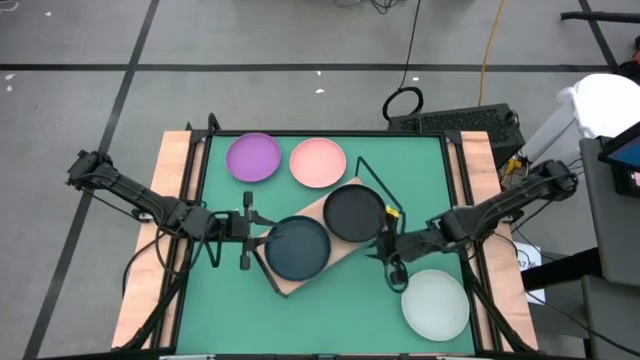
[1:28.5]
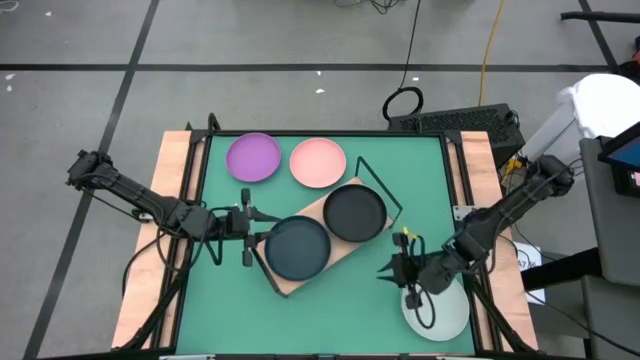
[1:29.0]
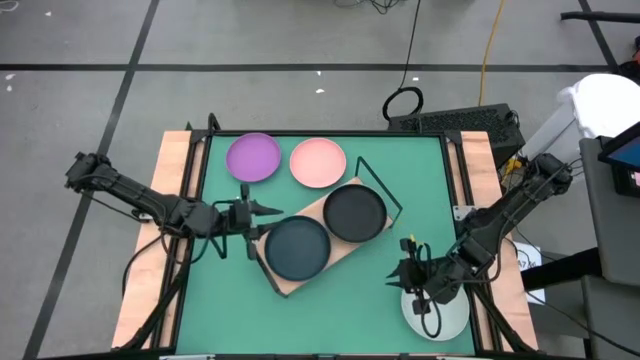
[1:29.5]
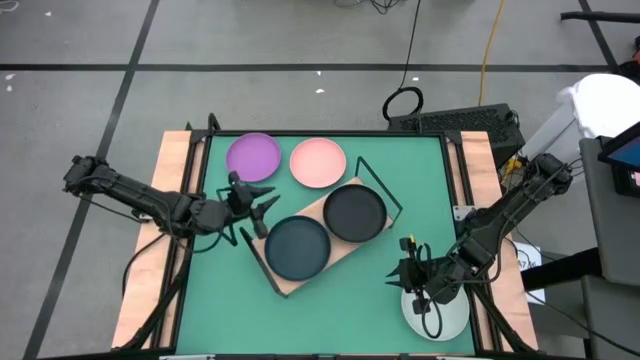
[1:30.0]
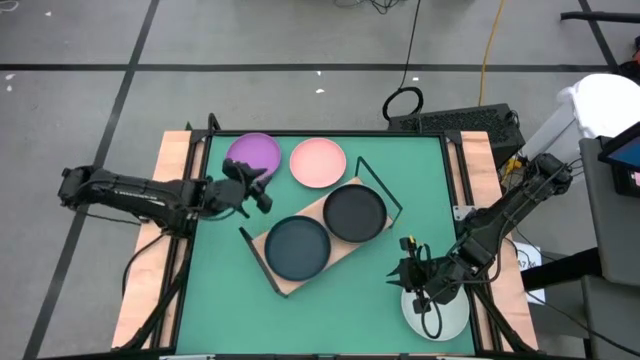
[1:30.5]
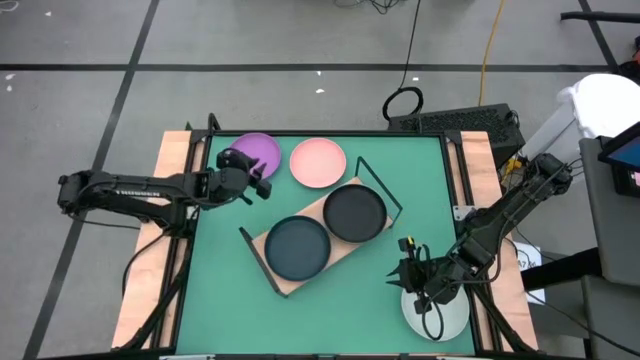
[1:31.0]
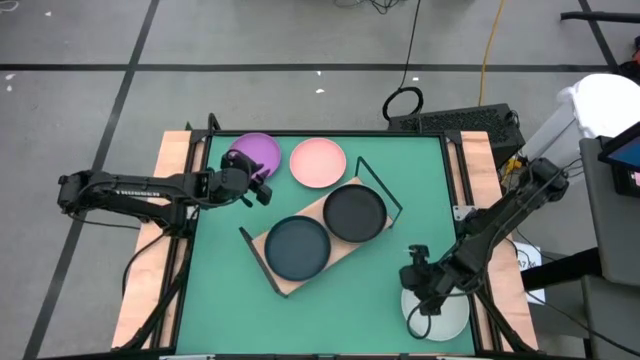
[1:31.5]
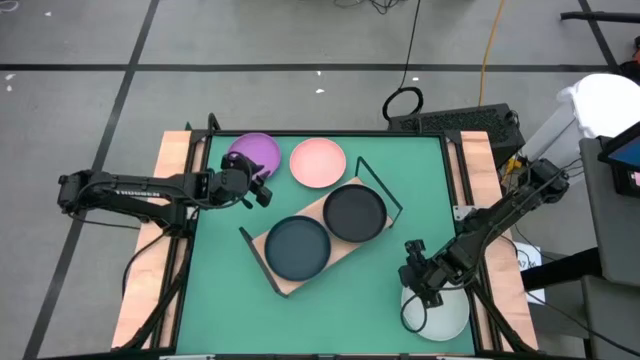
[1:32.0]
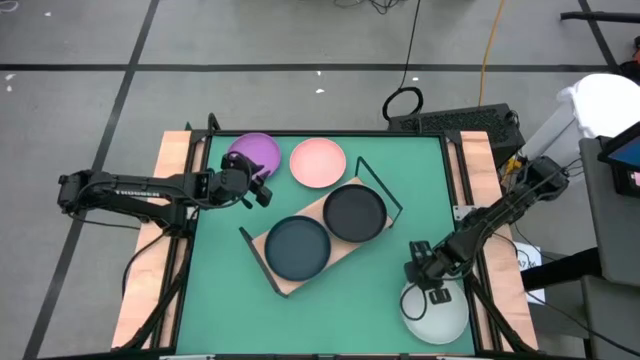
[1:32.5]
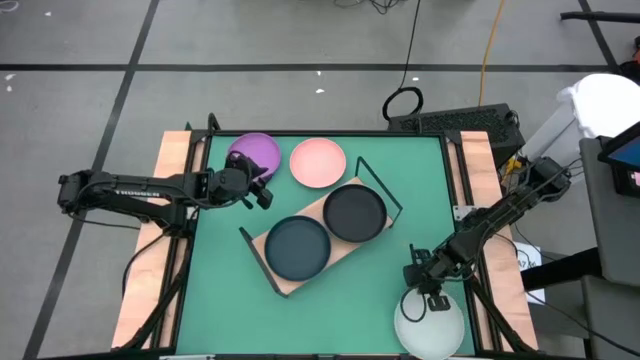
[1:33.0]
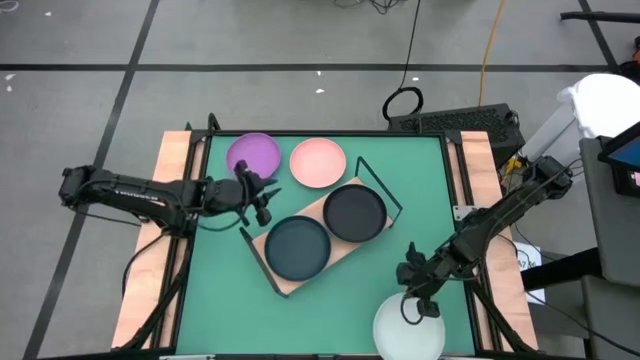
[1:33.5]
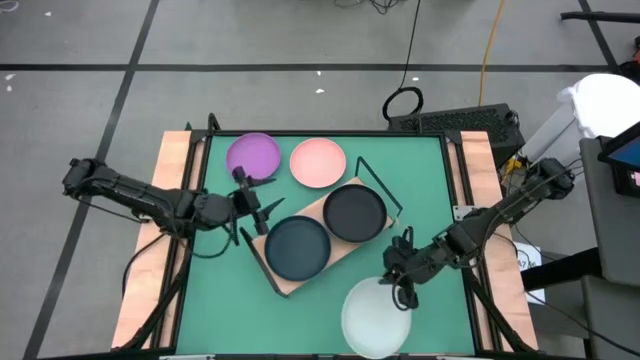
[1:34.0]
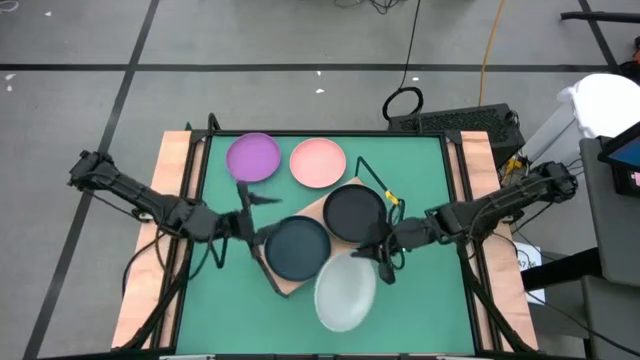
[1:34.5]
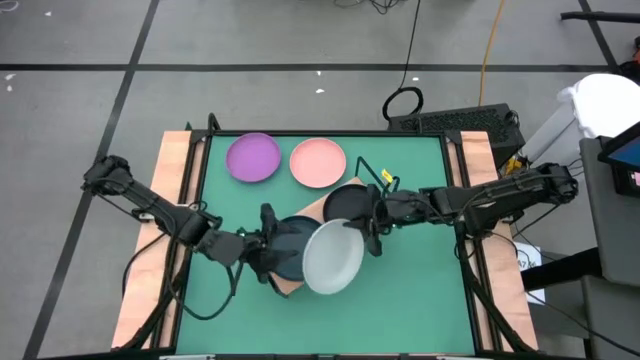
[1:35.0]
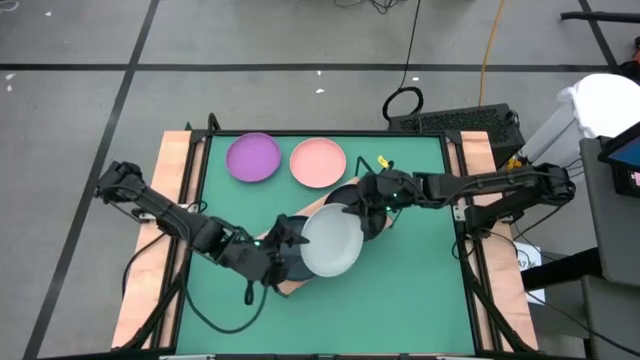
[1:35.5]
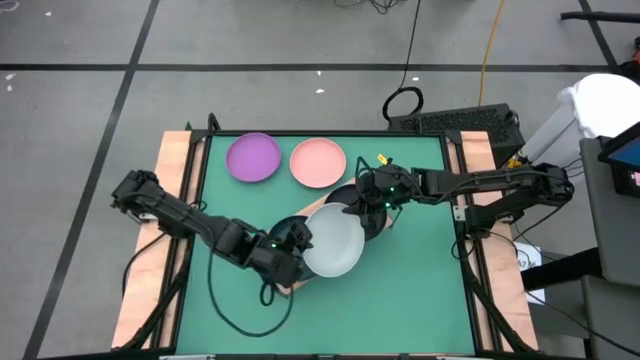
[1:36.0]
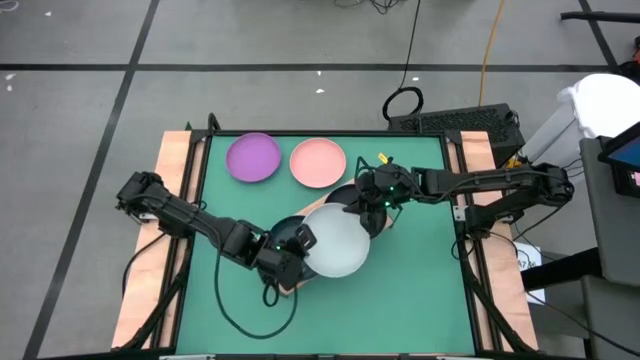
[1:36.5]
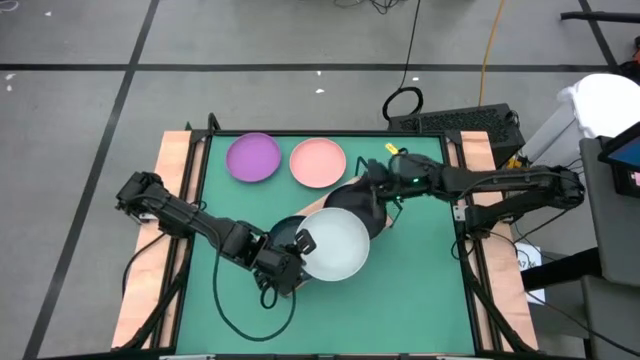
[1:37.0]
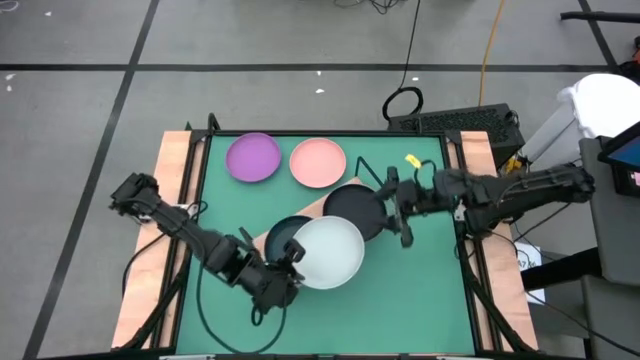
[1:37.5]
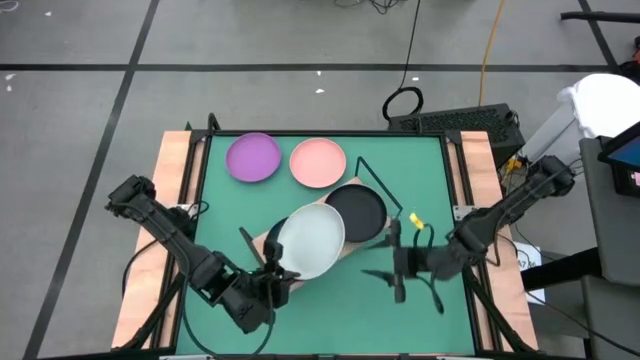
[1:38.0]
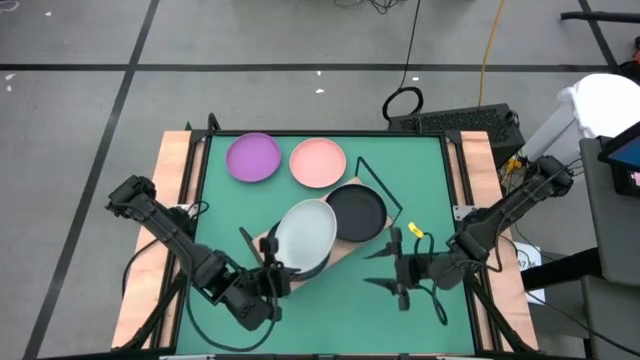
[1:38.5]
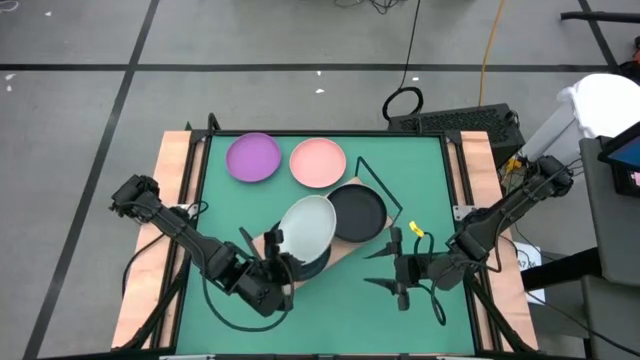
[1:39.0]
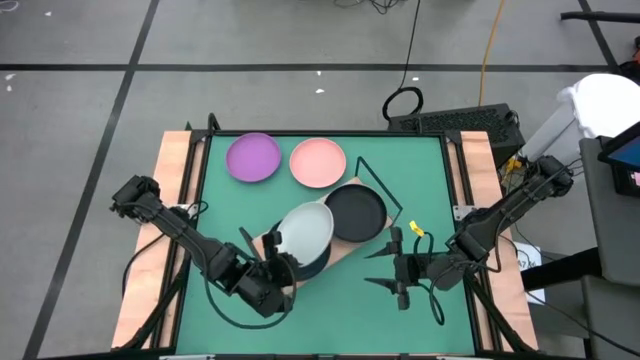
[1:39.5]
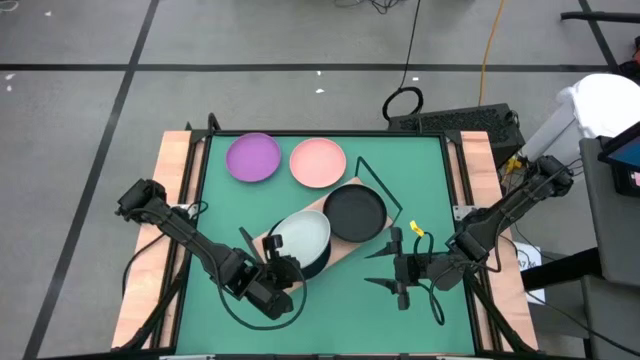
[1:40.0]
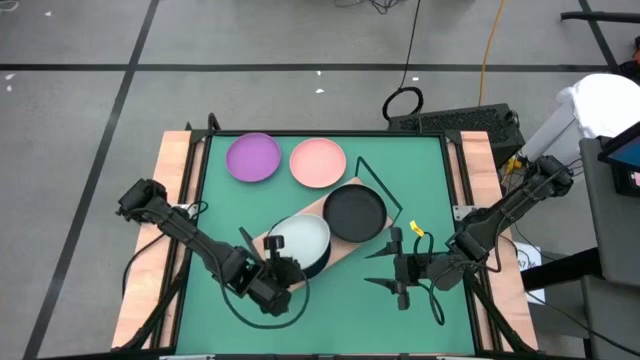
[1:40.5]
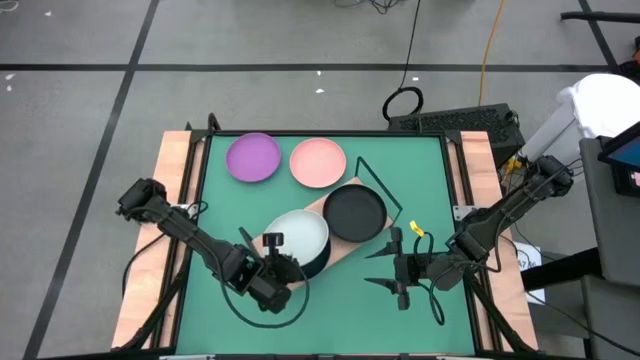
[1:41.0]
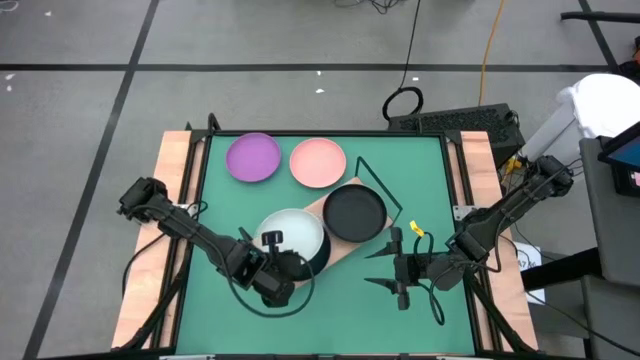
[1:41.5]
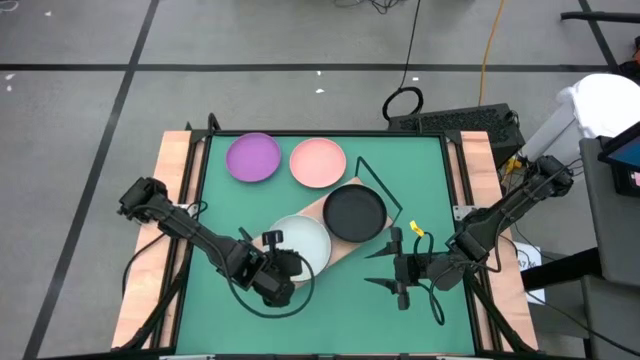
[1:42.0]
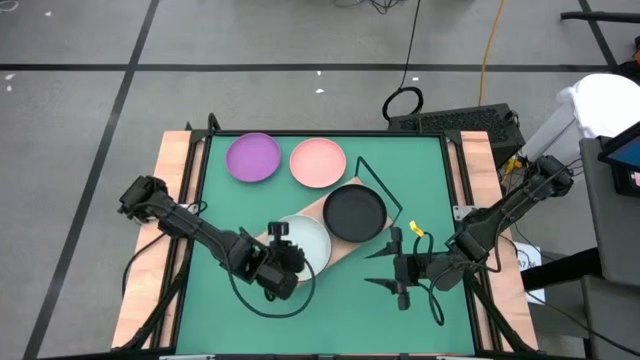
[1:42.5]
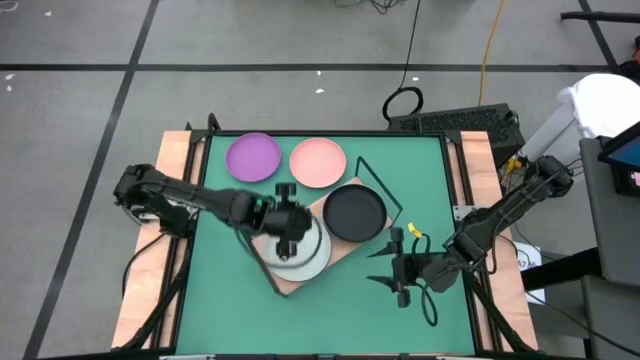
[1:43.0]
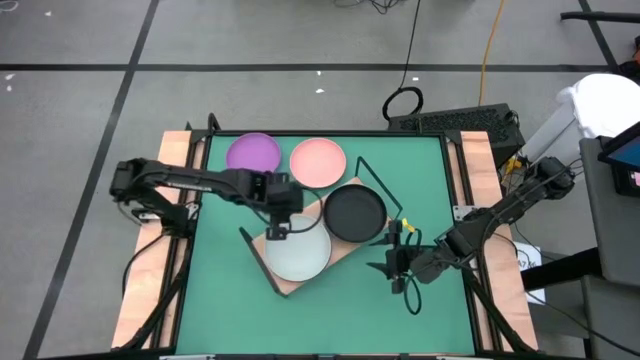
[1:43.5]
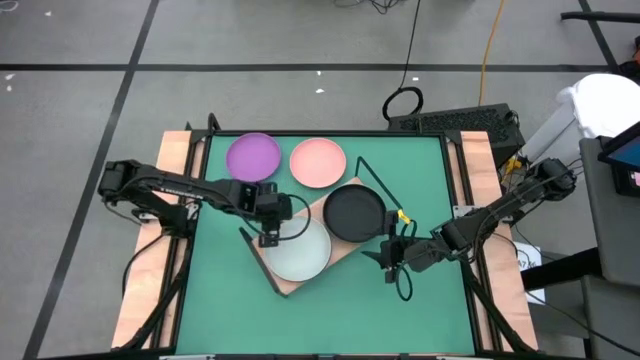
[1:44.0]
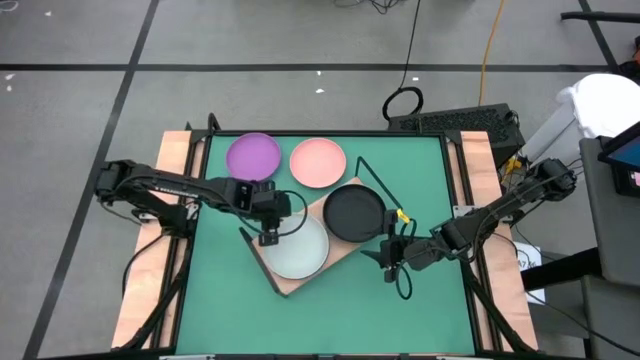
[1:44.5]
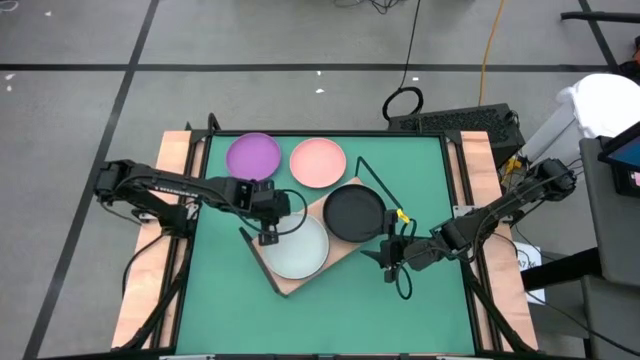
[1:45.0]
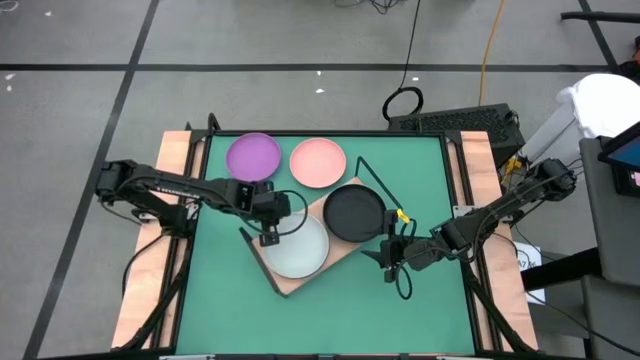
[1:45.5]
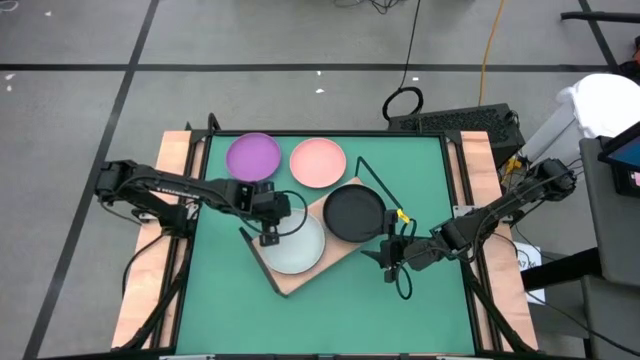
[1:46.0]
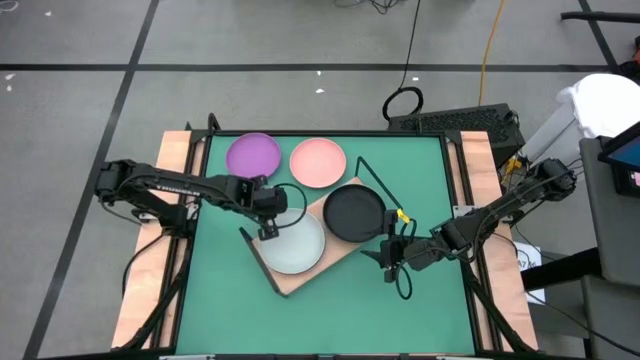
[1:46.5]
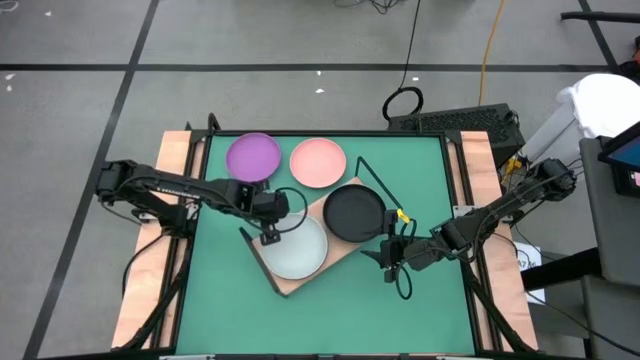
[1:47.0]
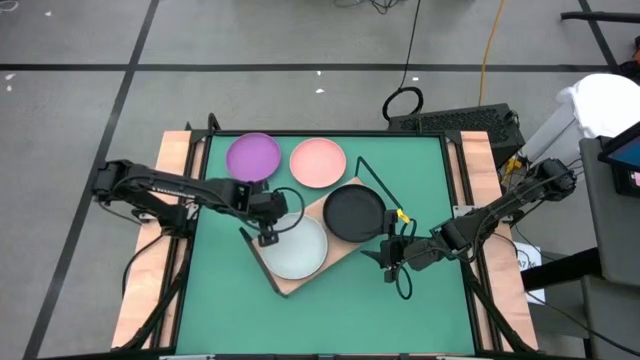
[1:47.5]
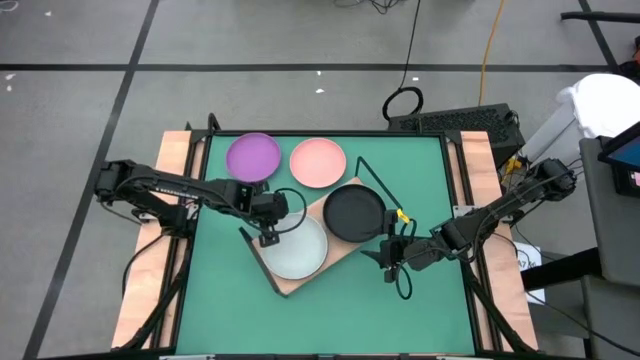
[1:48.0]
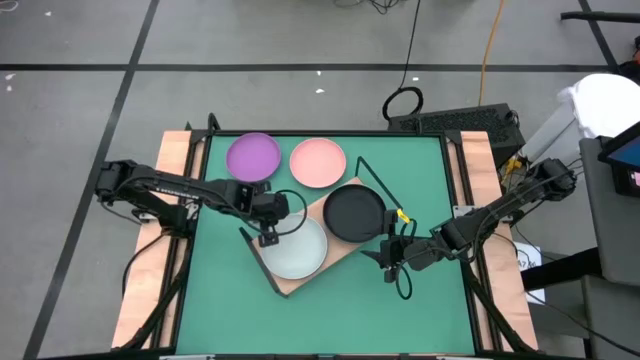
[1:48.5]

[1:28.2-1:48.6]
Task: Place and stack plates onto a shelf
Stack the gray plate on top of the blue plate on the shelf
